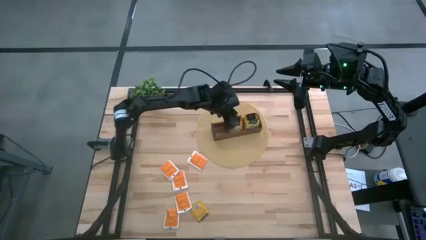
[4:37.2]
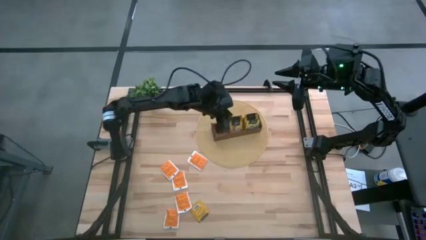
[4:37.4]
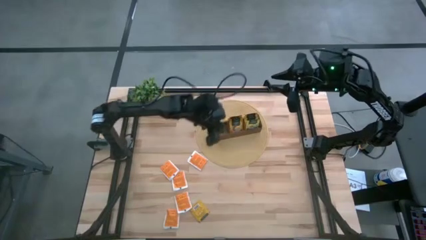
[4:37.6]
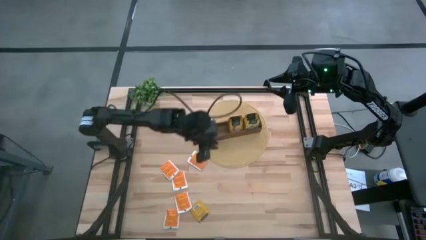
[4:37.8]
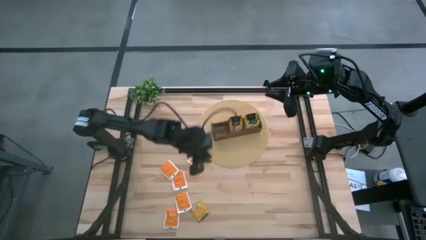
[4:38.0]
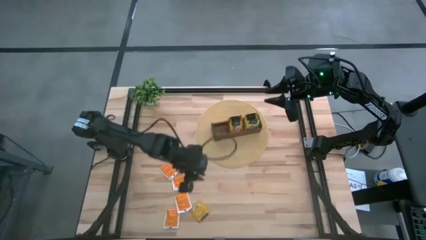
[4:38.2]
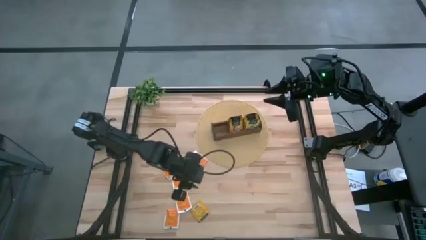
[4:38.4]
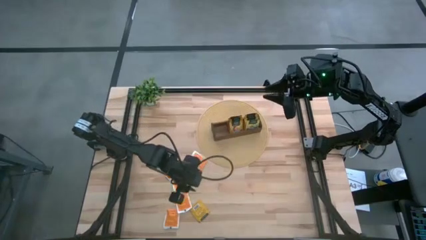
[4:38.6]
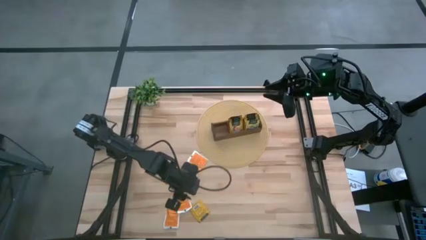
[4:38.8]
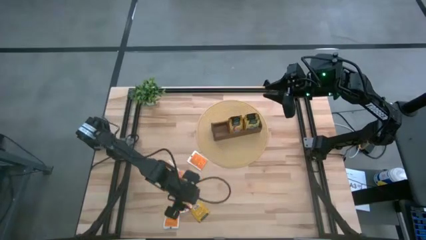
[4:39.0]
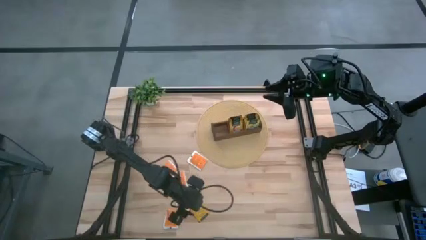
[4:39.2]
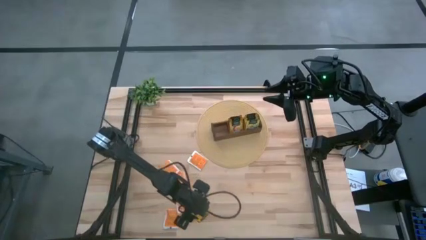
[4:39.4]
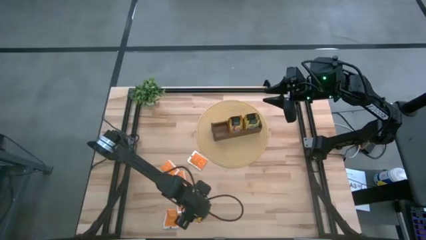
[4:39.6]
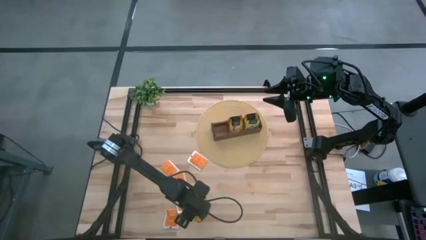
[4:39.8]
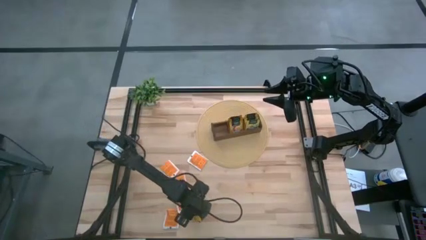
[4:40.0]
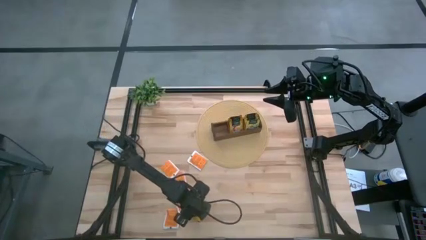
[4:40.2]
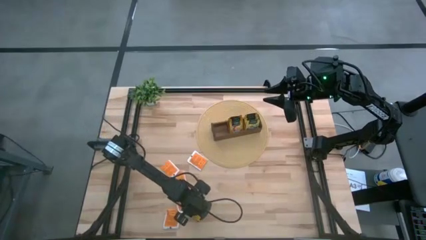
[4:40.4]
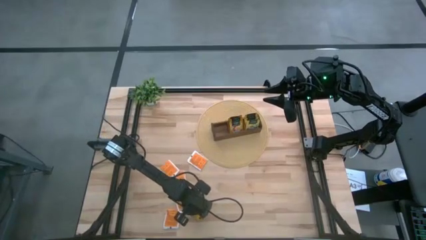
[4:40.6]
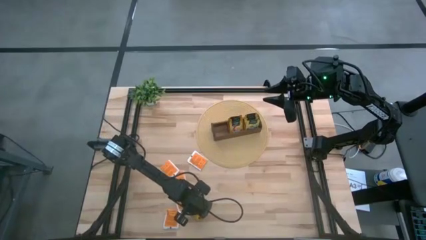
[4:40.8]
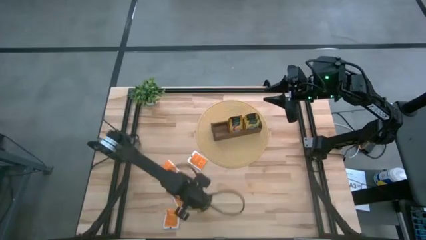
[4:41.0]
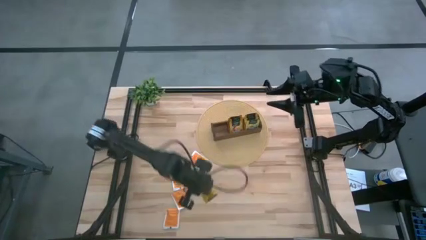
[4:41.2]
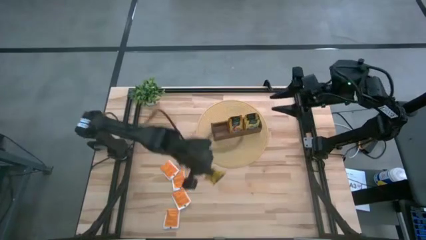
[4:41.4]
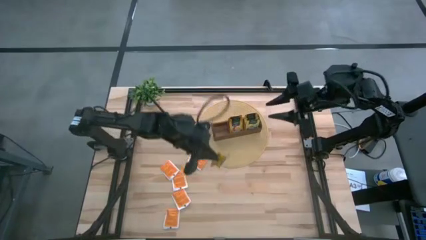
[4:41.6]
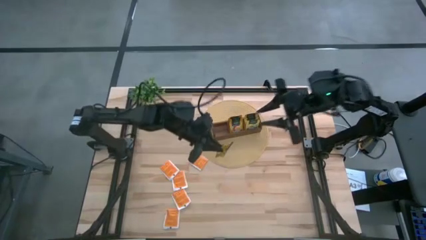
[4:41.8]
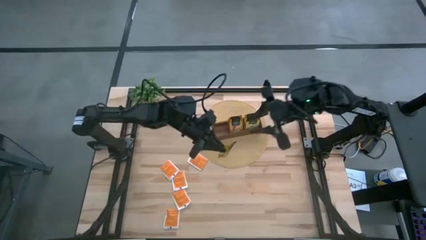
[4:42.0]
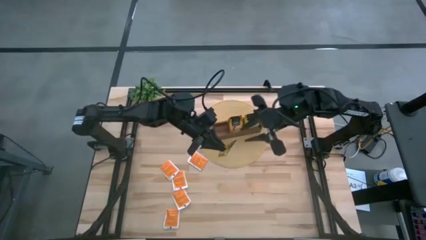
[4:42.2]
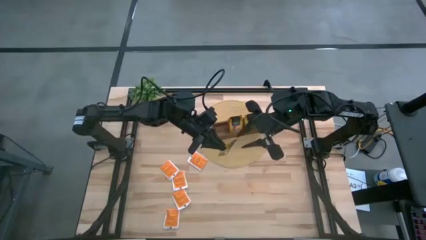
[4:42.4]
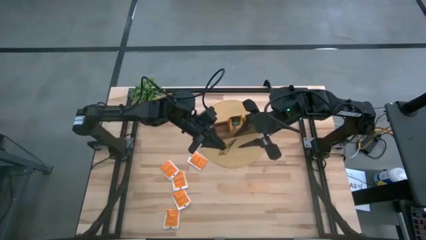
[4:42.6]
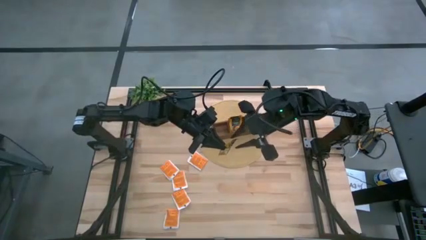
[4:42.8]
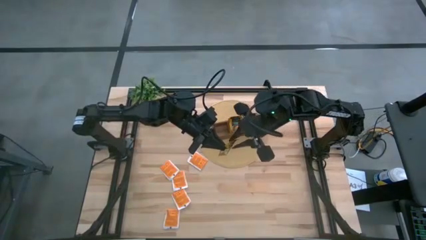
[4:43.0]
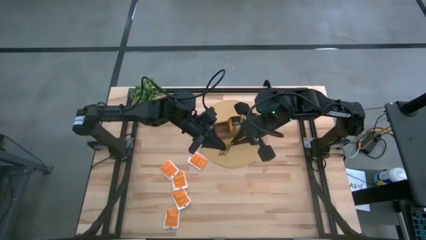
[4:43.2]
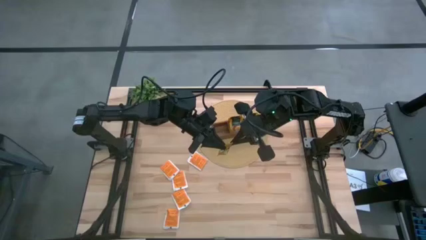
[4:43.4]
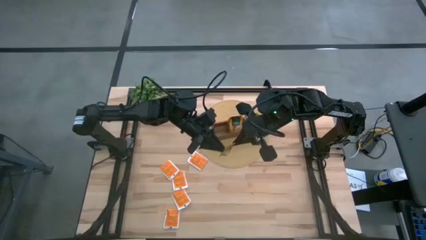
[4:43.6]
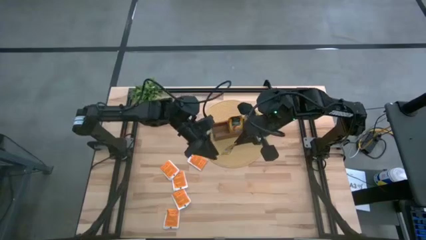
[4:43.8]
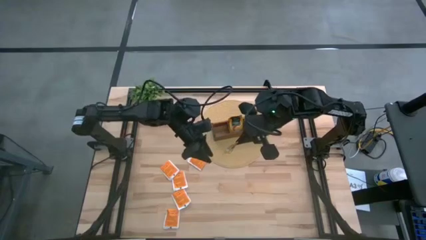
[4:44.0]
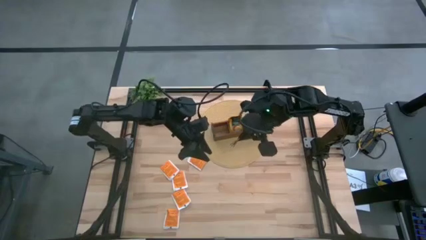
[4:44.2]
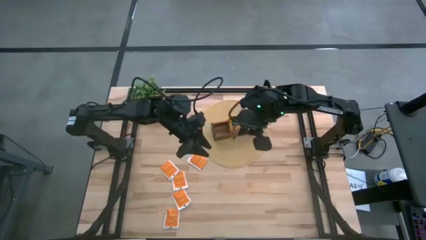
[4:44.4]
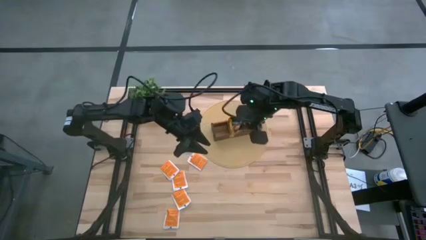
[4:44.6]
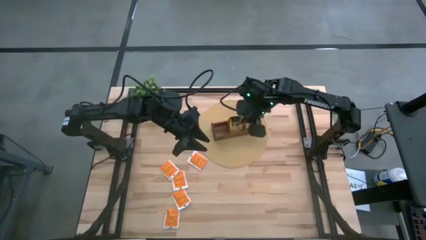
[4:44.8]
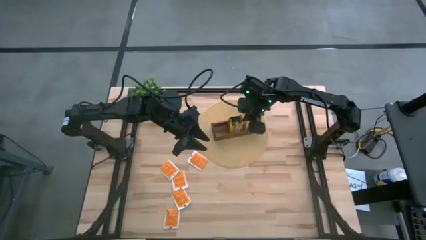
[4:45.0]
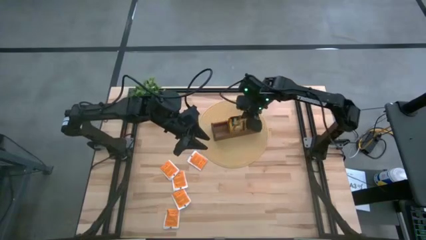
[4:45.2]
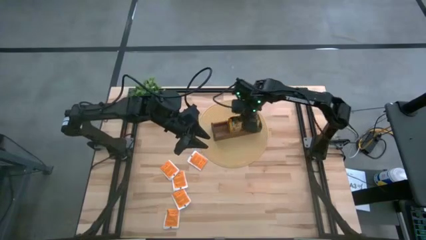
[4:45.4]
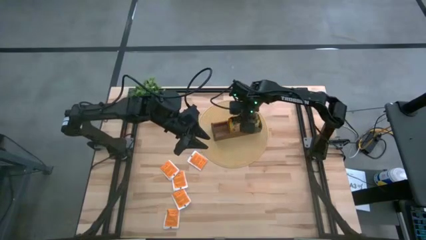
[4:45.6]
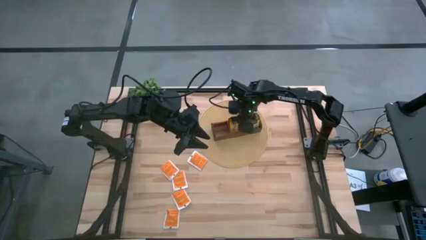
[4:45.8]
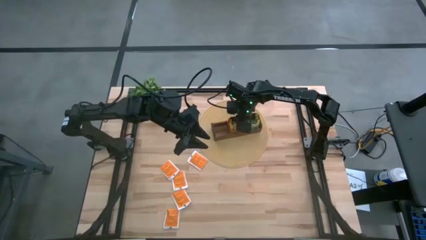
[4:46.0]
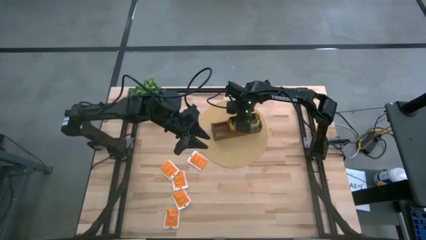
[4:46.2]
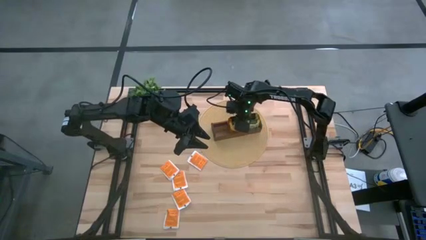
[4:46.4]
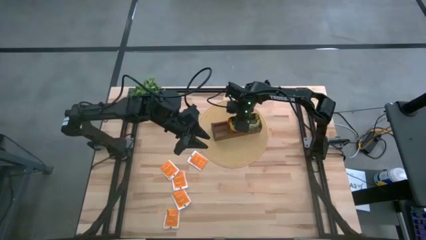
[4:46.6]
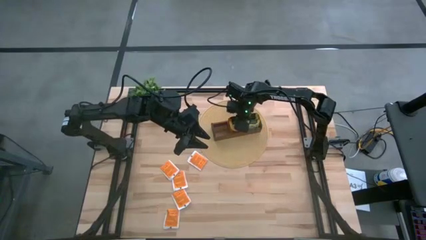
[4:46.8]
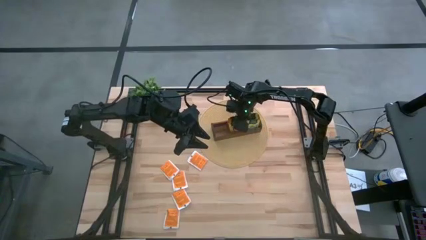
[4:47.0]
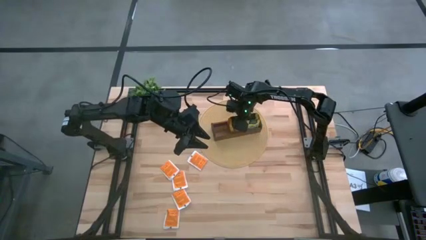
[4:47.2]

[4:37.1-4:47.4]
Task: Pick & Place Tea
Put the orange tea bag into the middle section of the wooden organizer

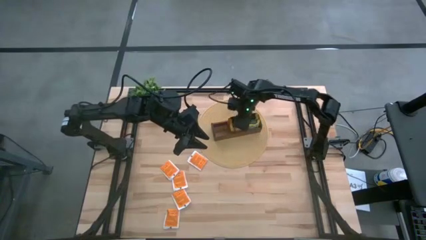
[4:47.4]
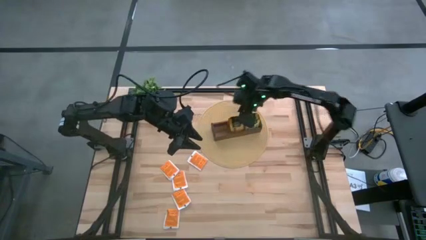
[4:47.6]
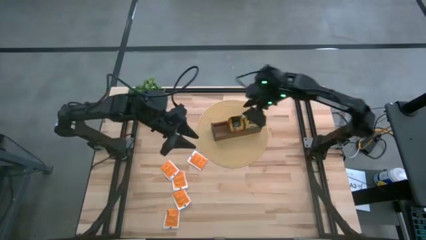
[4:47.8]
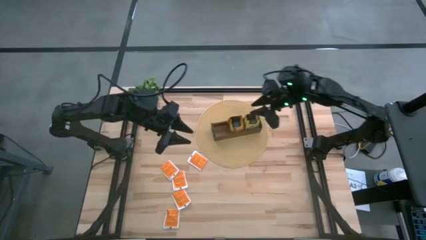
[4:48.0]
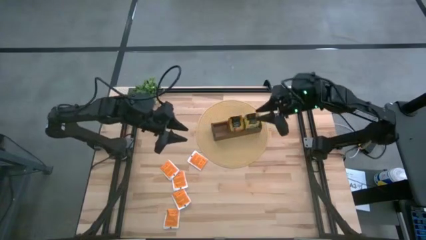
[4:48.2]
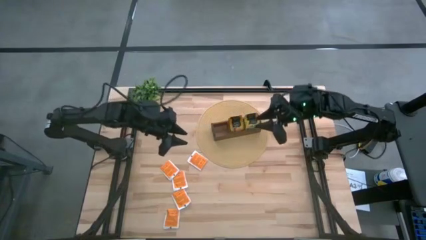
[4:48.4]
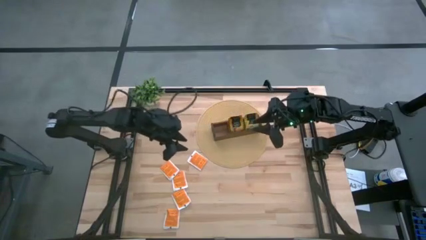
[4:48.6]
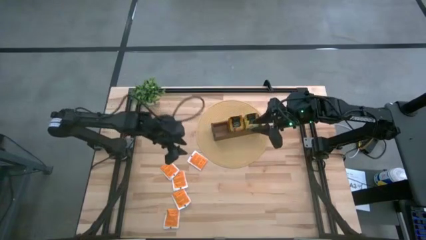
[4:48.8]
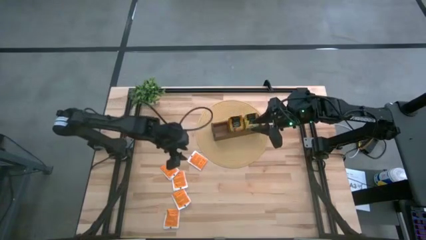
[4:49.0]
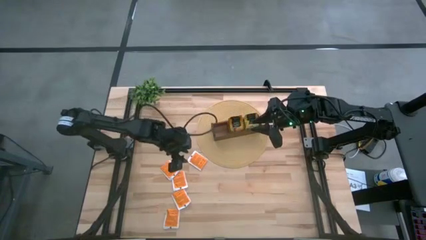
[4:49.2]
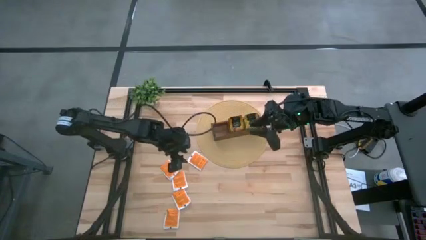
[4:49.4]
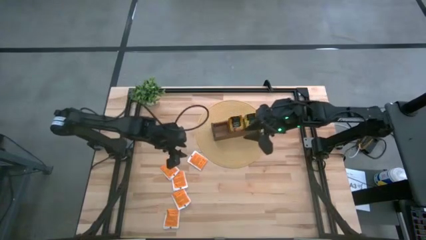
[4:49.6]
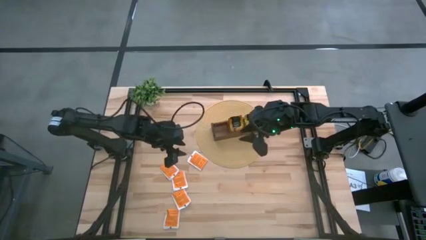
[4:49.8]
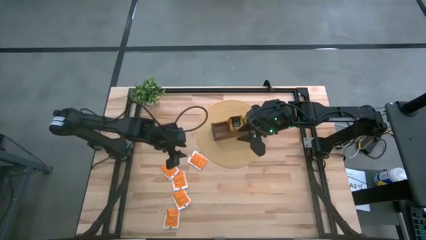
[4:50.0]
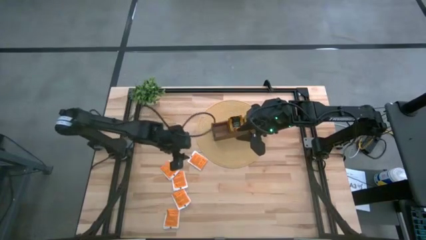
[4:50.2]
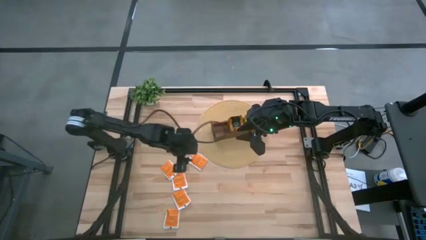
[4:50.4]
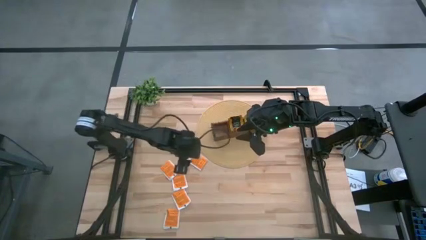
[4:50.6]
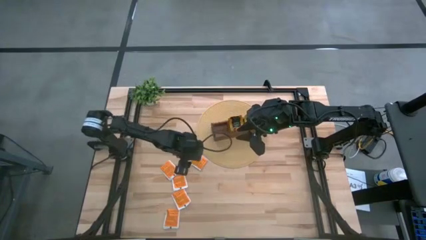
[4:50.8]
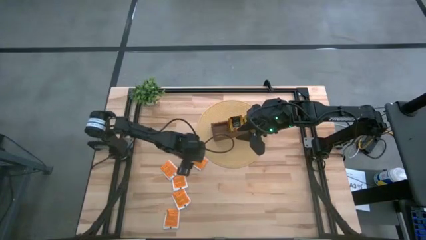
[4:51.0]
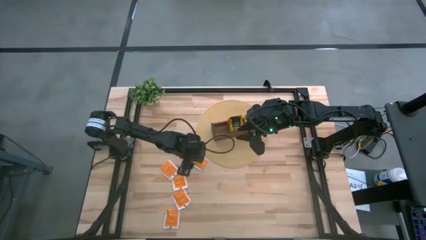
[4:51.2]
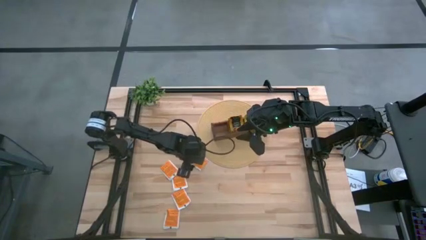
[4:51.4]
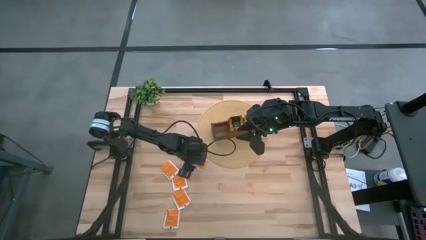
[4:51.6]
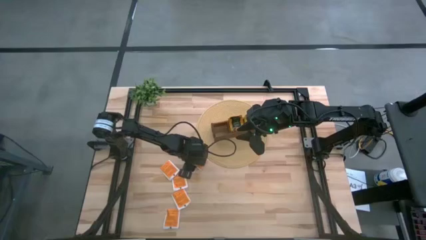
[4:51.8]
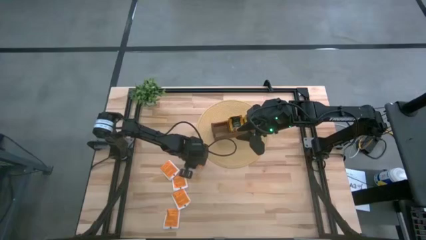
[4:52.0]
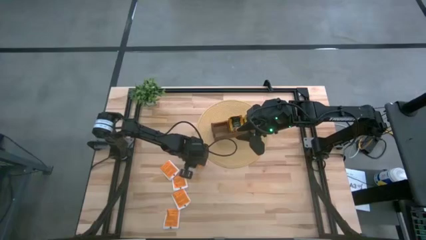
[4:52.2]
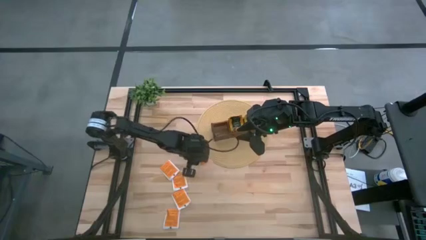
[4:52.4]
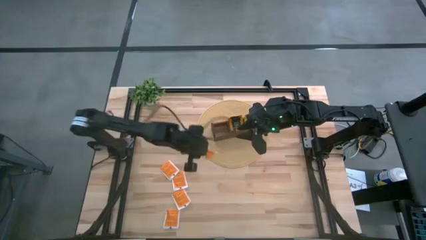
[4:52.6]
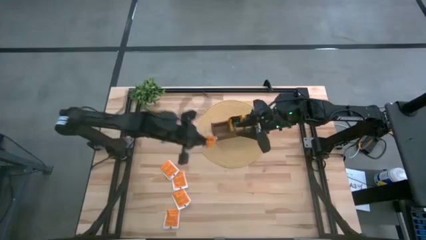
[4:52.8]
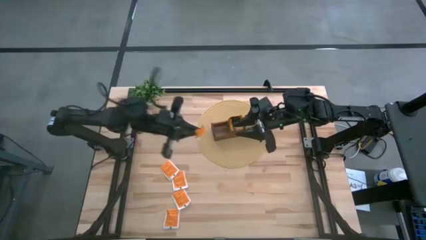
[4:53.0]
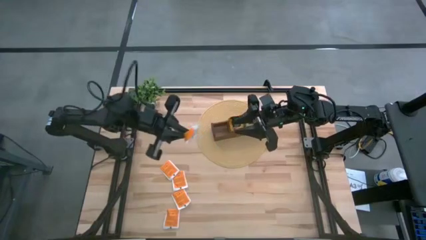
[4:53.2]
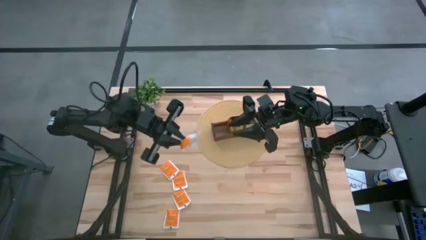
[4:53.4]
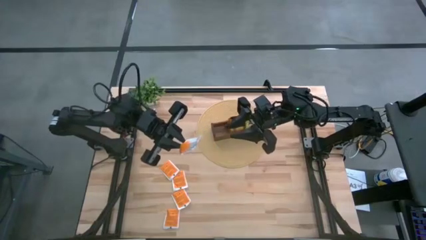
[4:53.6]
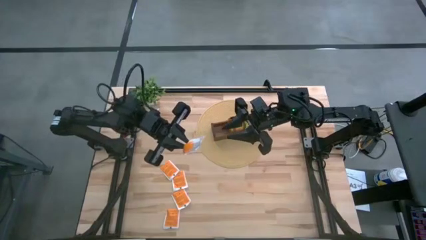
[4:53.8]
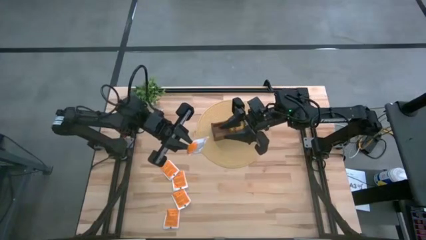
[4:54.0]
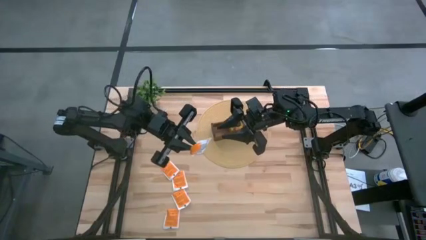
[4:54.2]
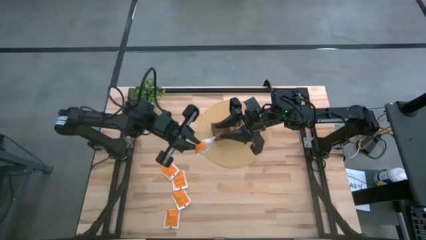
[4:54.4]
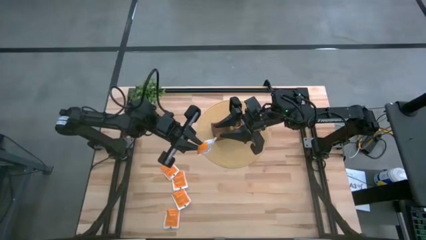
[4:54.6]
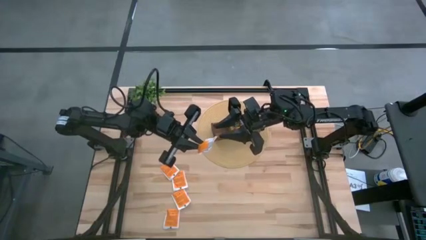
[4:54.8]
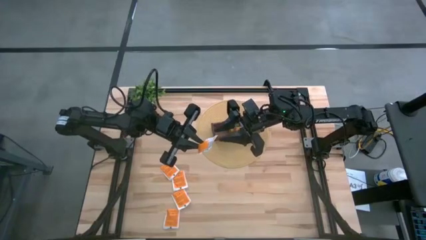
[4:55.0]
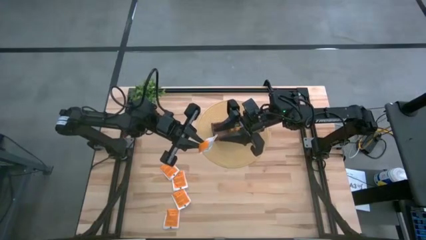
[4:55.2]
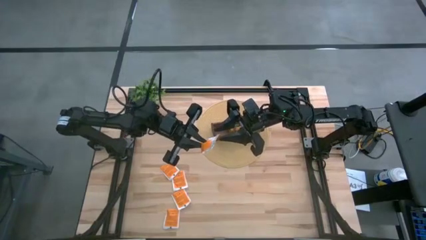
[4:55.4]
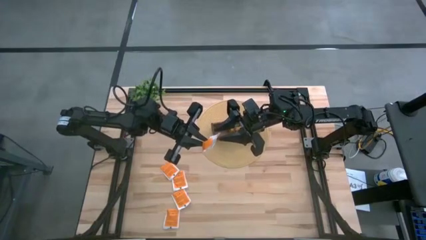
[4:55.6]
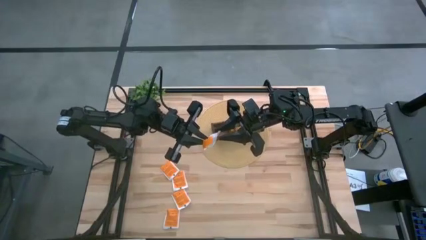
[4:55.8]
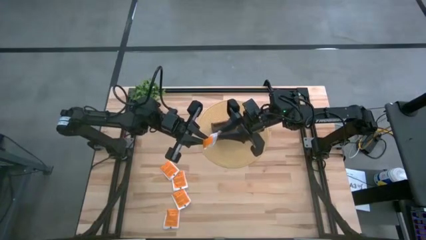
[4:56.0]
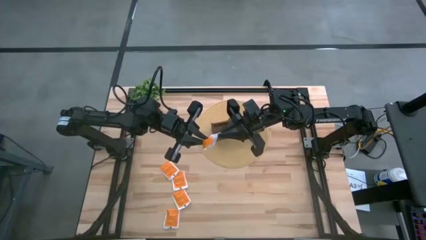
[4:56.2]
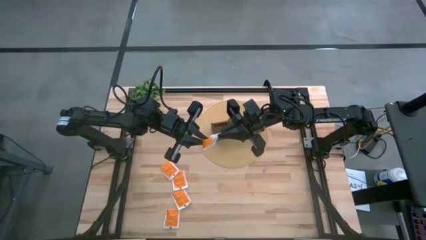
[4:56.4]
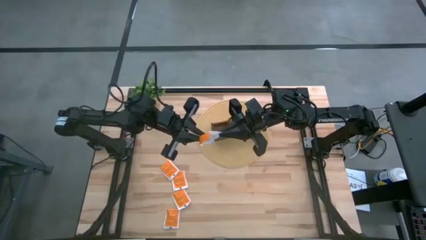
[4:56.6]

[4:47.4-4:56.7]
Put the white tea bag into the left section of the wooden organizer
